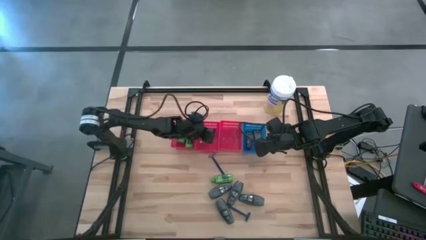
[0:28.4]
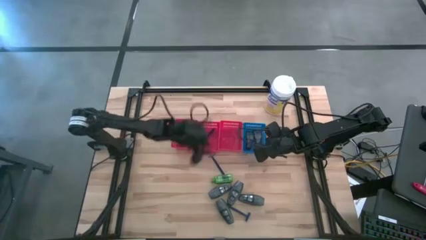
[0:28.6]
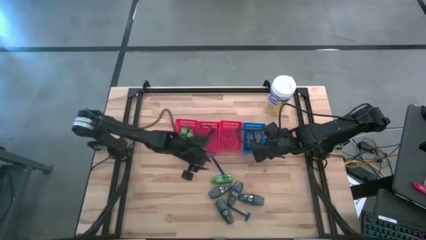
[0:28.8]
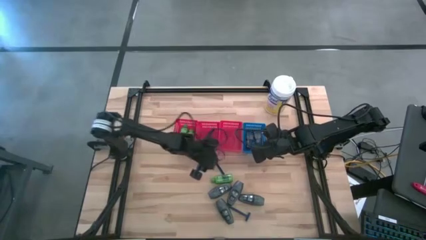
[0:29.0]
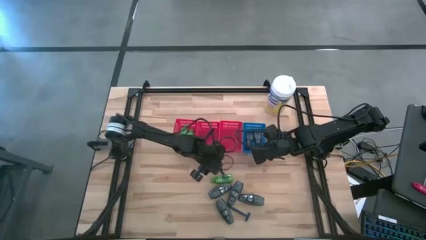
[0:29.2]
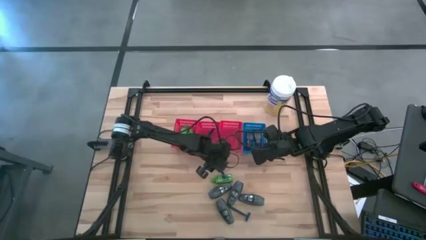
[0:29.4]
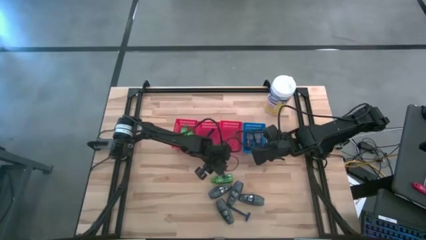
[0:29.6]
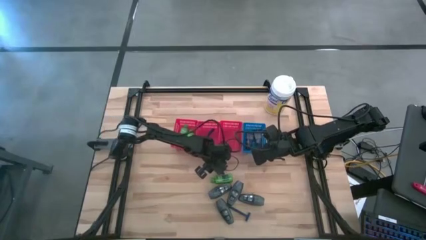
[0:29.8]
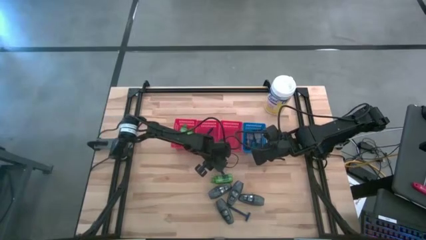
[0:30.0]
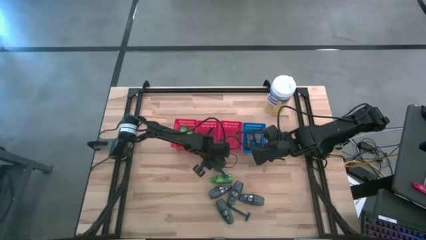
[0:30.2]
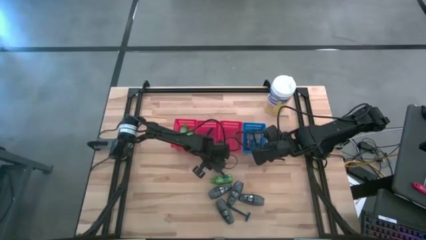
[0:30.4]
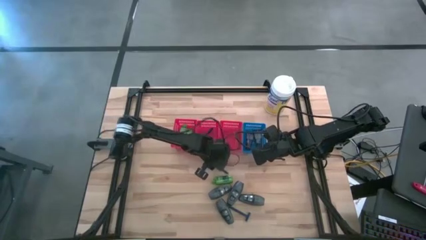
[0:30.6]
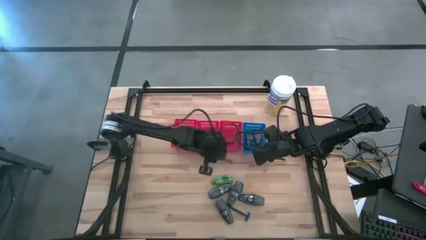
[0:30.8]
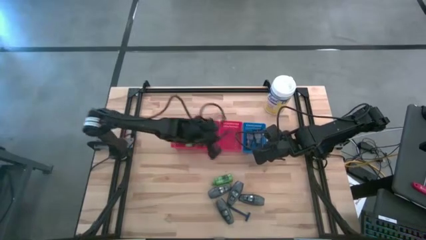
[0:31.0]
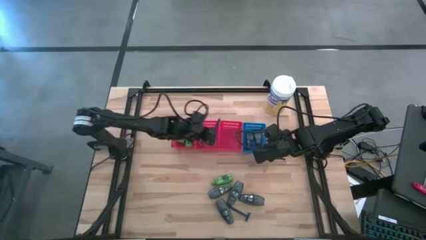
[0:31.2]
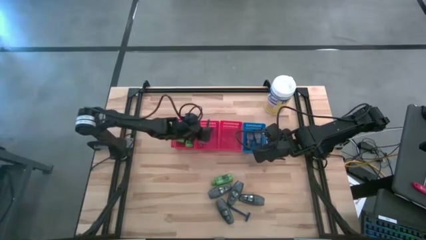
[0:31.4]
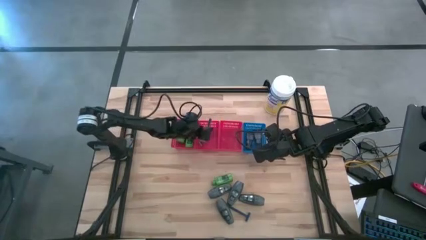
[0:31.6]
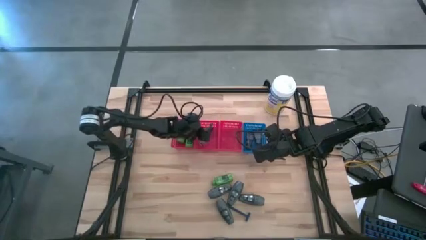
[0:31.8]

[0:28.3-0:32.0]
Task: Pick & Place Travel size toiletries
Put the blue razor into the middle red bin

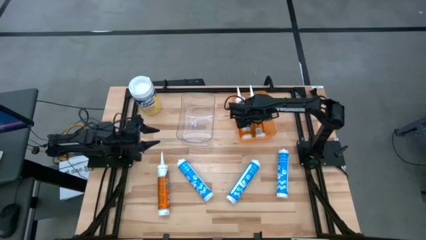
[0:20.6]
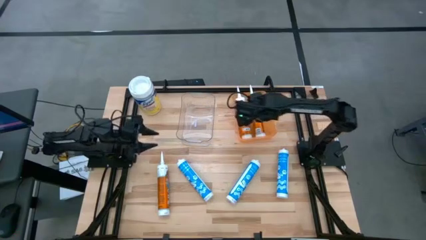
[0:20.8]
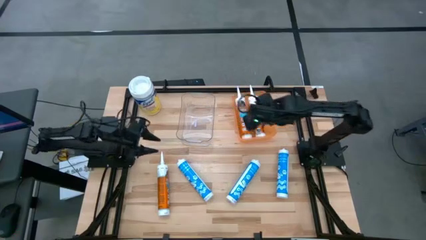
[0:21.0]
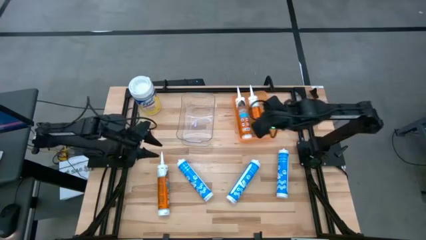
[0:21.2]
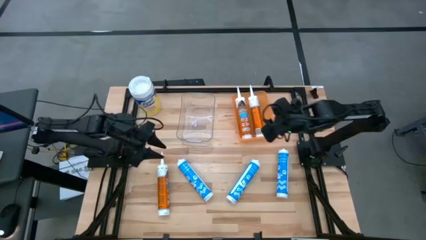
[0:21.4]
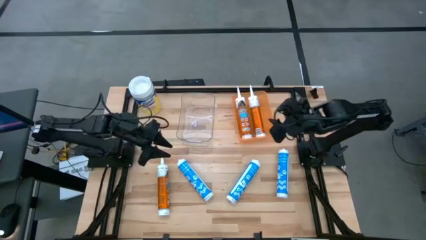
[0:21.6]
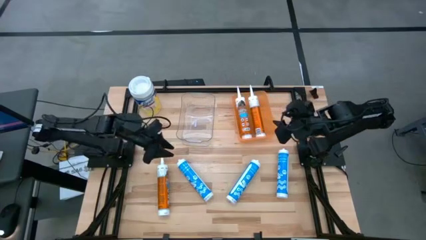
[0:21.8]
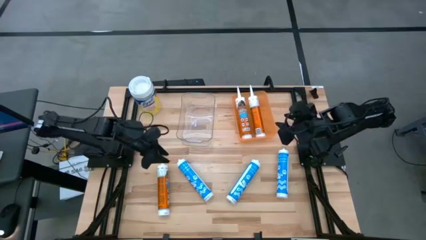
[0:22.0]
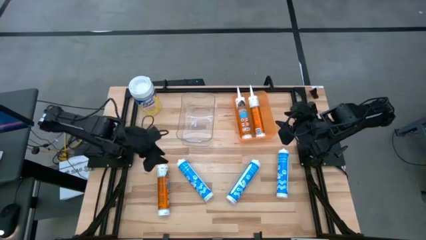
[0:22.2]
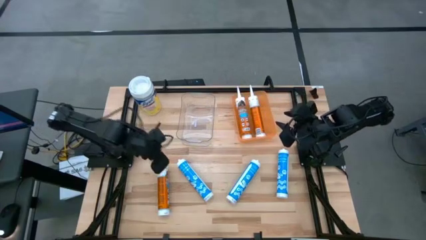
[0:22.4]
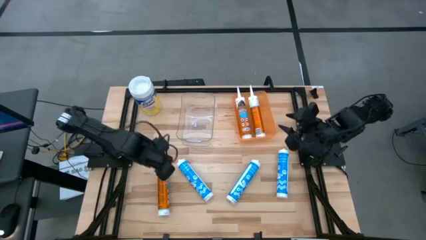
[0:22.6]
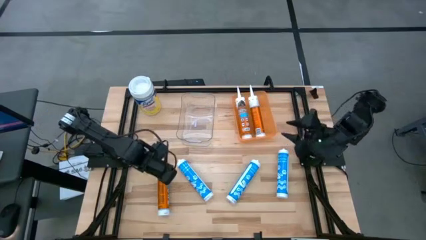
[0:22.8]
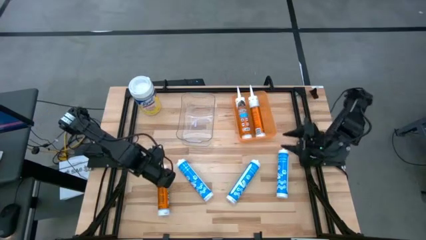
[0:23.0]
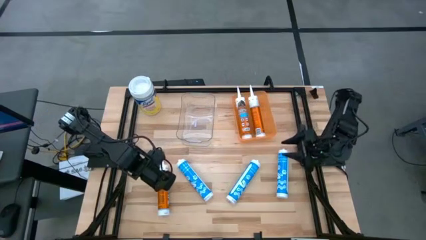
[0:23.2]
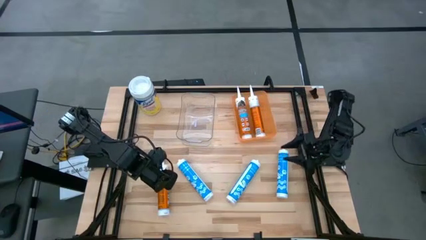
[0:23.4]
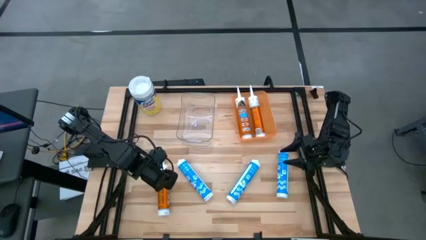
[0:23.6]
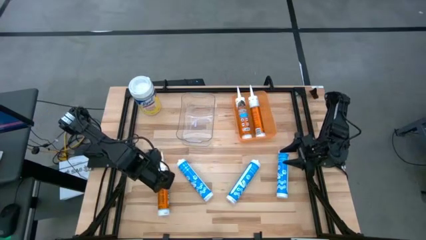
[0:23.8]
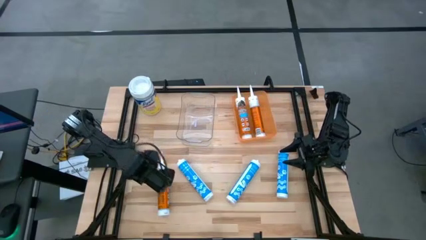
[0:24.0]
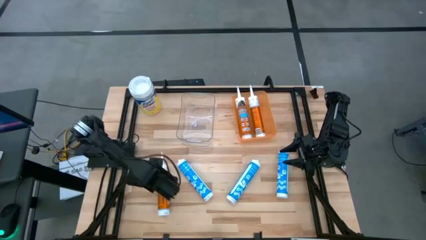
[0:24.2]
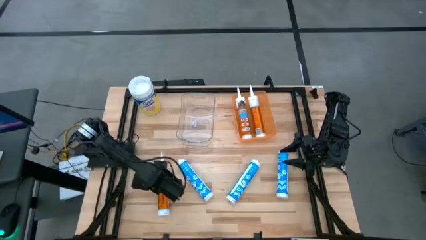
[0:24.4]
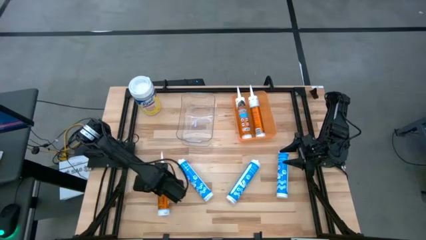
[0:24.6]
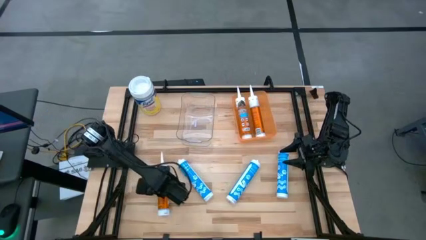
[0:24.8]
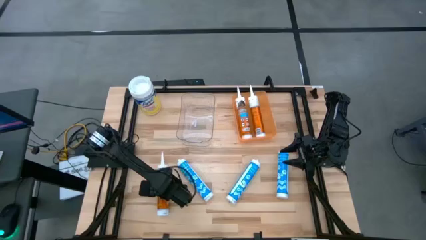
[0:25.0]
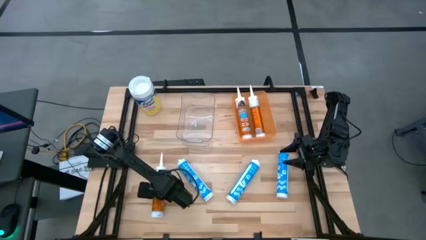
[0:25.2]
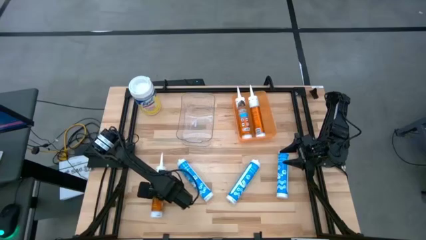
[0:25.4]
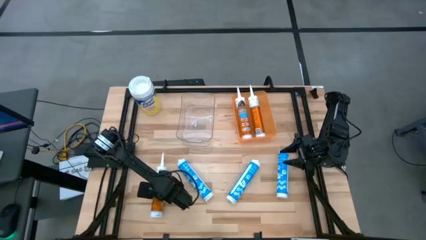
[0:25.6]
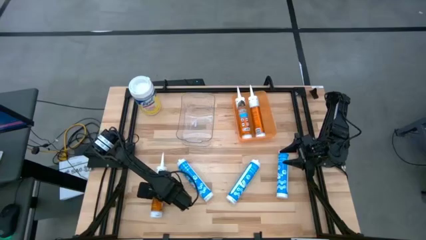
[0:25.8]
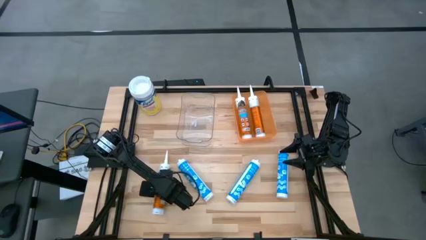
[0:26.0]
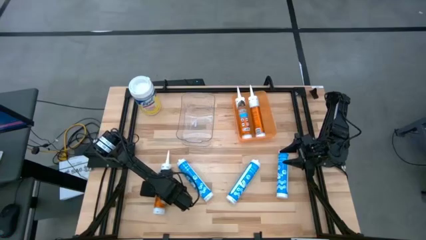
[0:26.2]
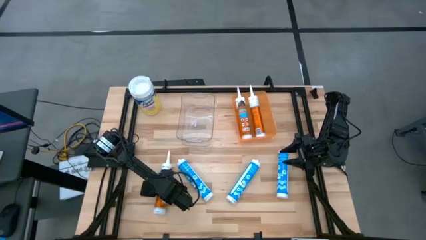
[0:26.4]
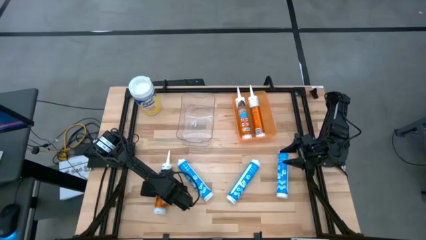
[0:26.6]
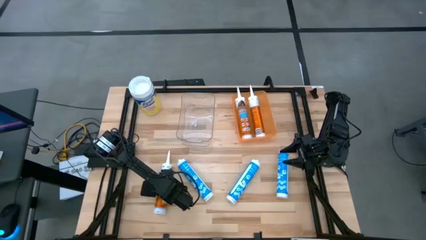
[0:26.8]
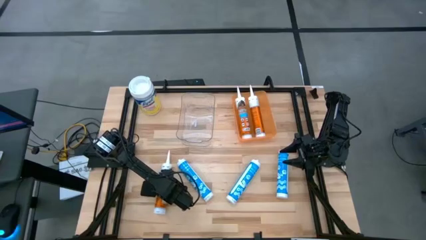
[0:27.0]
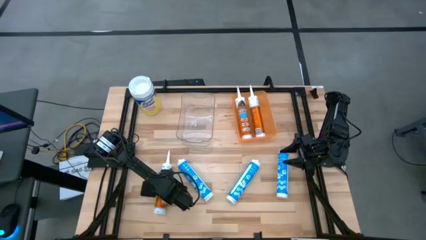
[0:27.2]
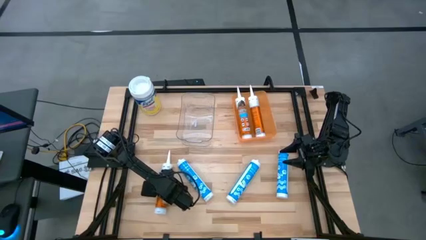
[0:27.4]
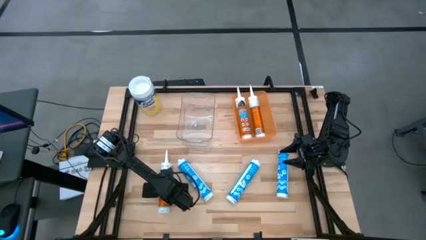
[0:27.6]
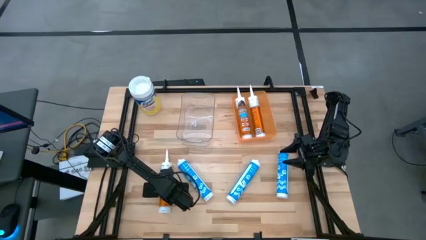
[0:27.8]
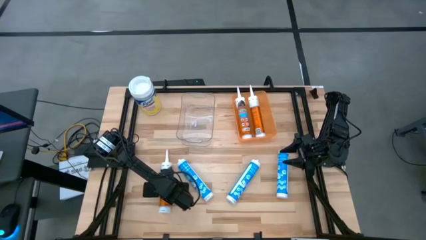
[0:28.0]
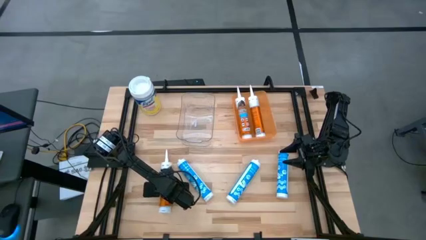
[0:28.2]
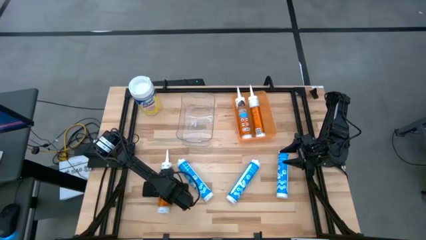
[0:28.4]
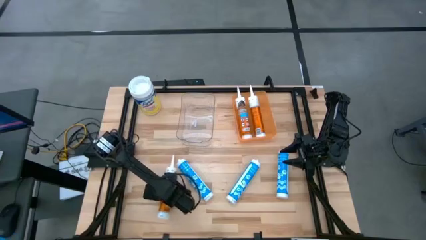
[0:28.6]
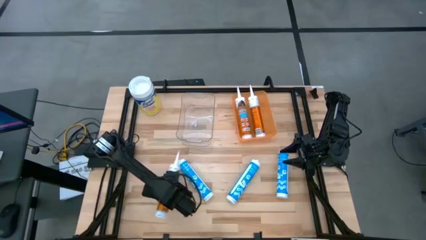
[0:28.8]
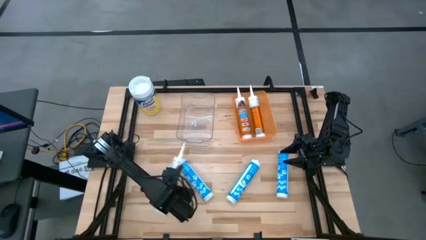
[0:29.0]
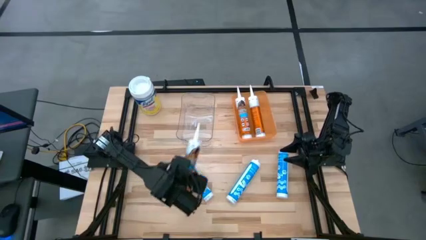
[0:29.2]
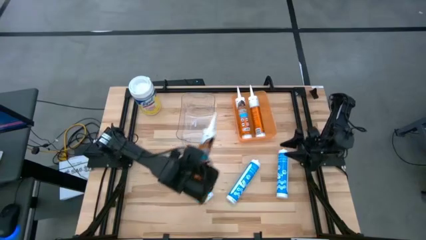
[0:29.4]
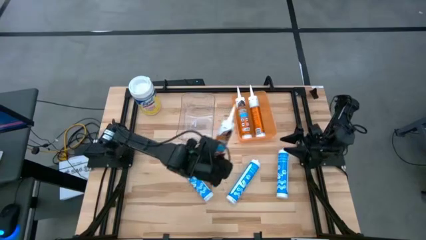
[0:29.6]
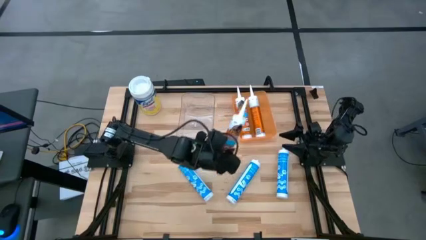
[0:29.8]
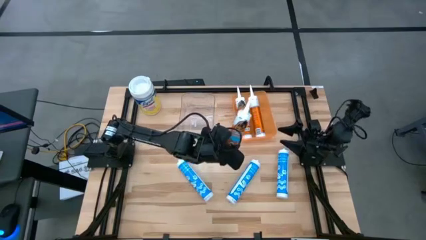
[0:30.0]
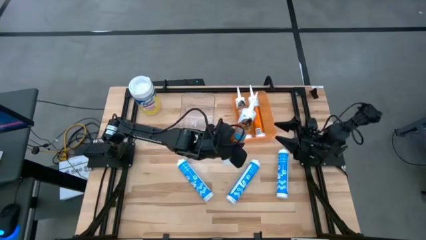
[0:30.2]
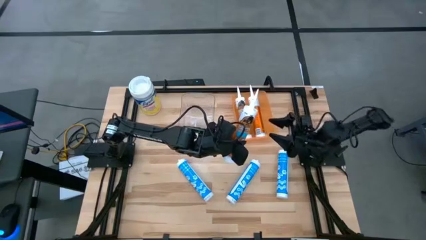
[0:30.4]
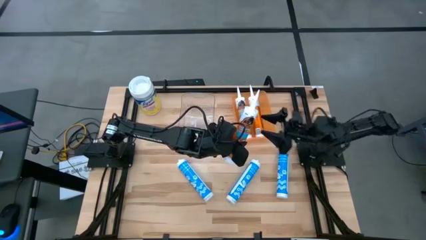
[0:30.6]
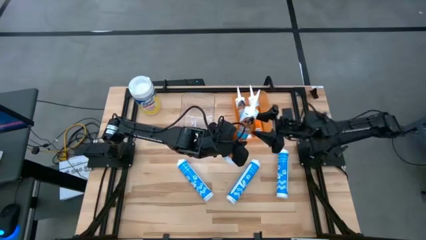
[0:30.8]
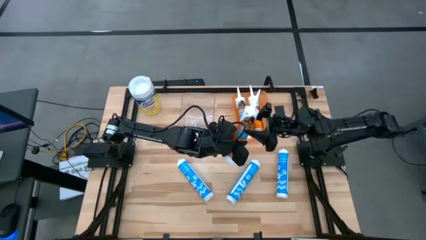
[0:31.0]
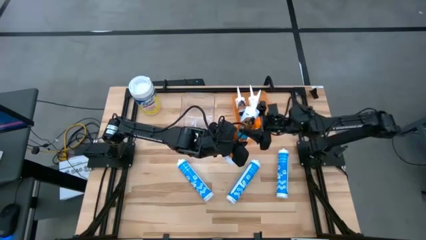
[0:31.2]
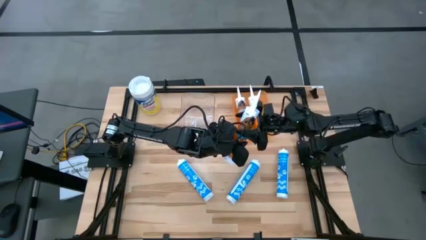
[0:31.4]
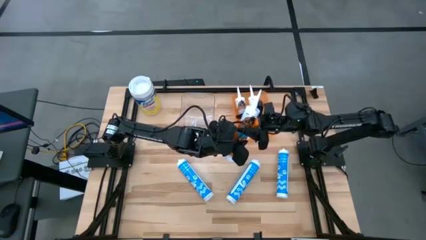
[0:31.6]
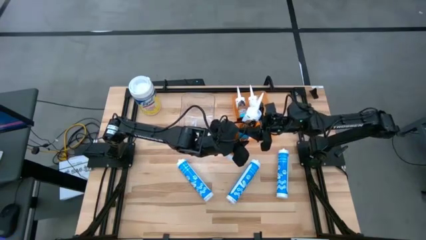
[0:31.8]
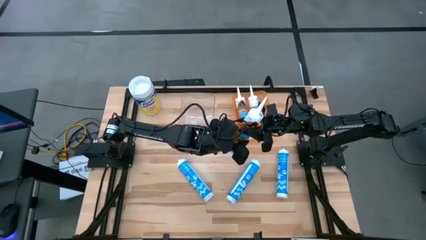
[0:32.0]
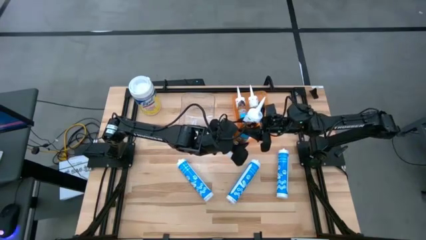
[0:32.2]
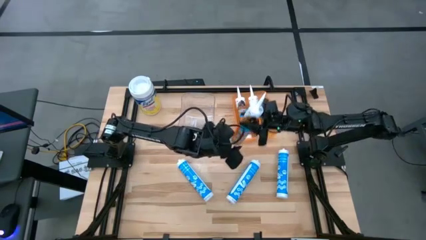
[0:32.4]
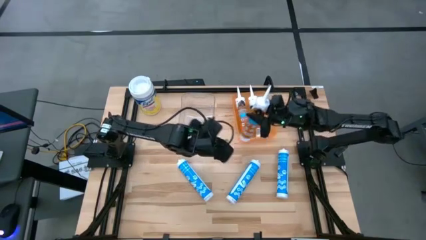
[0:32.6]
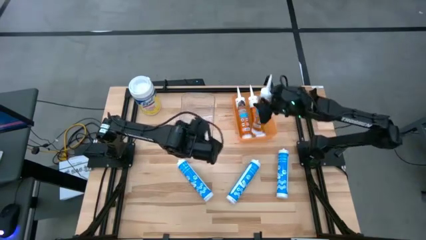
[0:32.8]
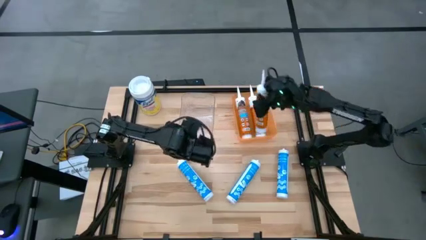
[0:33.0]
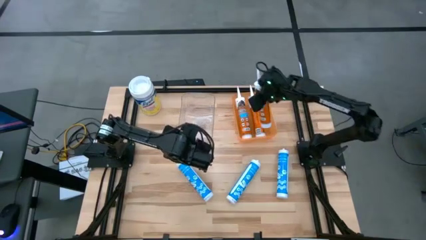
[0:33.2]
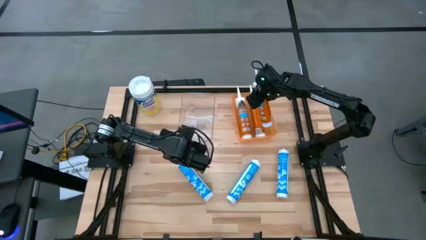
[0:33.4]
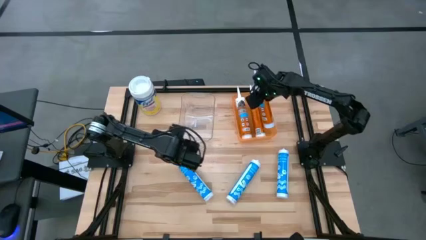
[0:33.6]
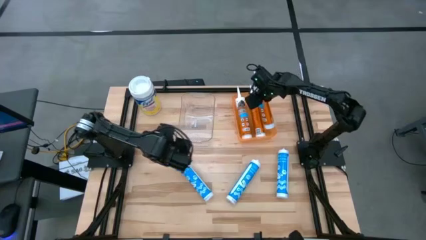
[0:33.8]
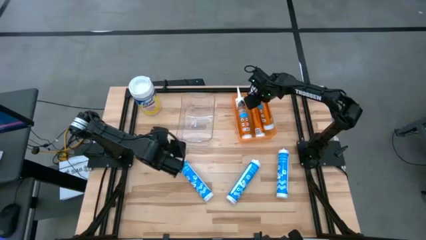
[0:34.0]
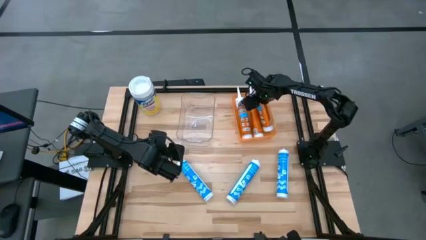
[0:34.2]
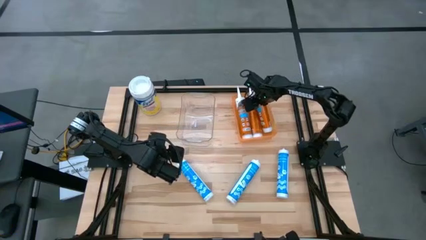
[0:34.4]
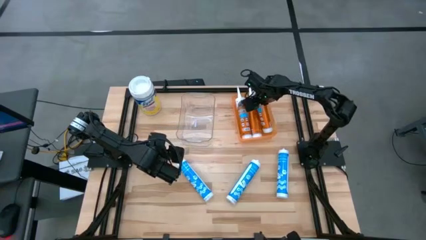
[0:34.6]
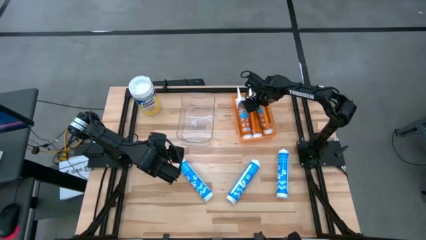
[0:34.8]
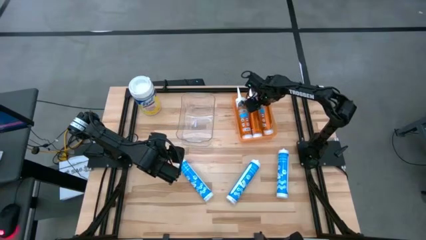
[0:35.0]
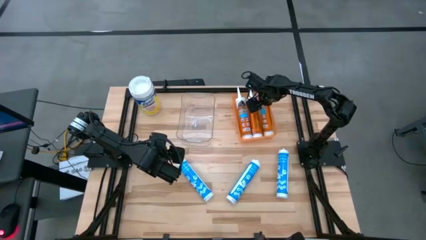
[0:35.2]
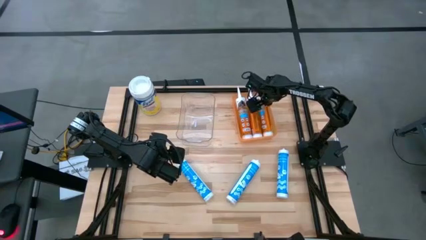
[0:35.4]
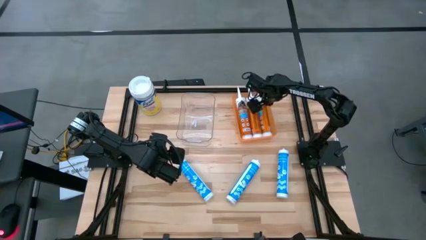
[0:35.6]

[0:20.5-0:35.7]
Task: Pick & place silicon tubes, Sealant and Lysol wipes
Put the orange sealant into the orange bin
